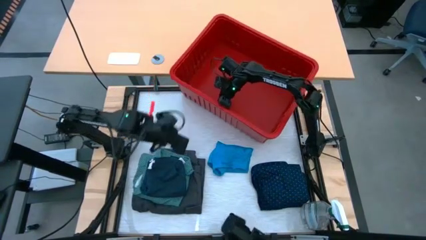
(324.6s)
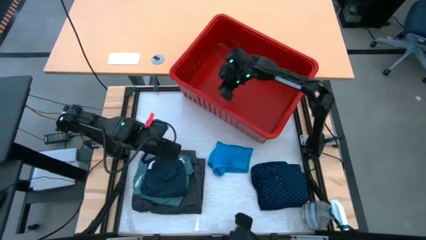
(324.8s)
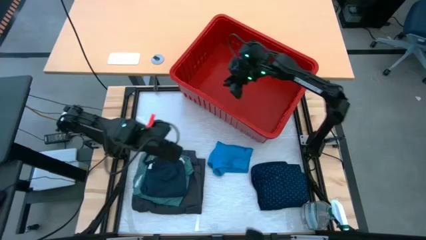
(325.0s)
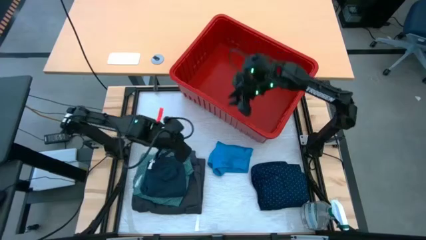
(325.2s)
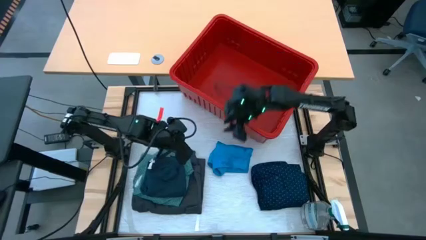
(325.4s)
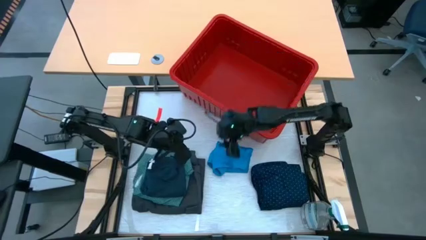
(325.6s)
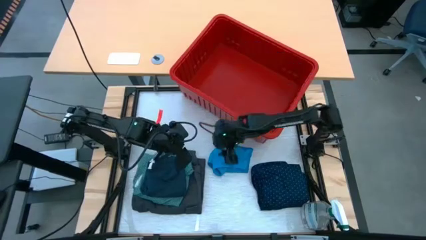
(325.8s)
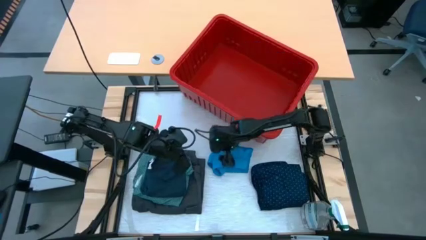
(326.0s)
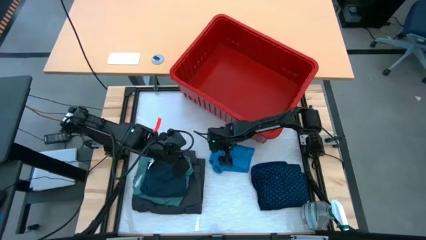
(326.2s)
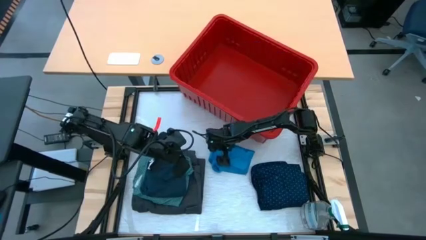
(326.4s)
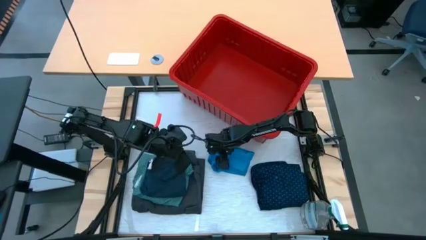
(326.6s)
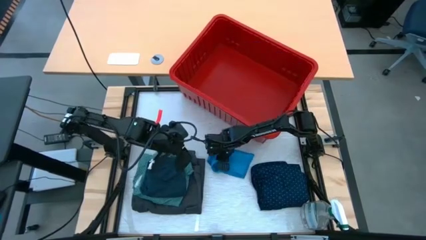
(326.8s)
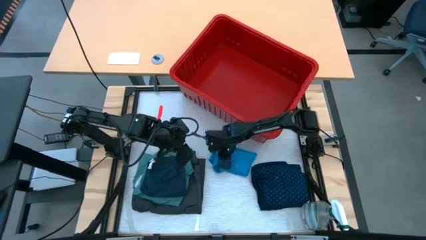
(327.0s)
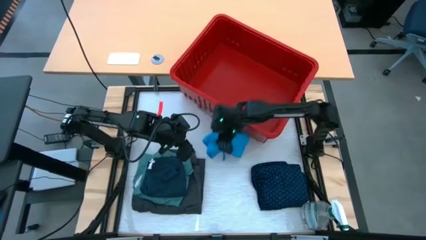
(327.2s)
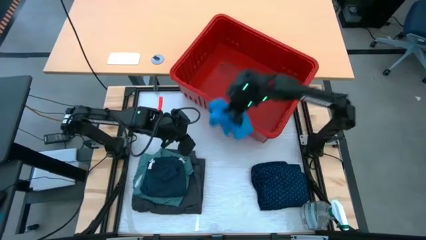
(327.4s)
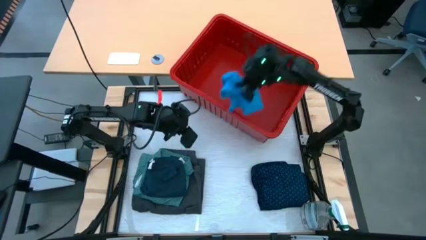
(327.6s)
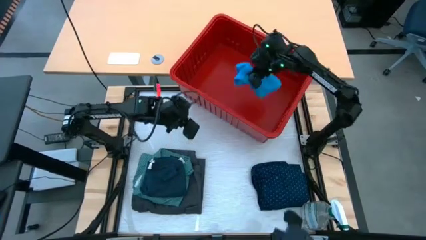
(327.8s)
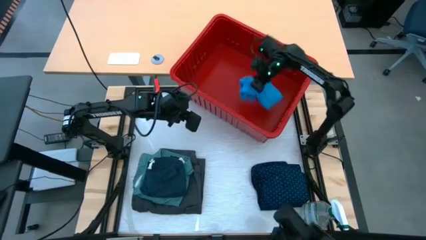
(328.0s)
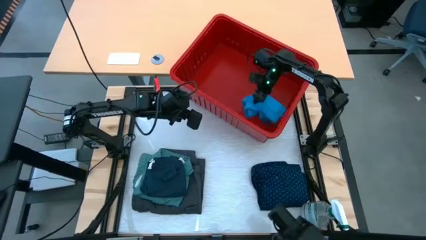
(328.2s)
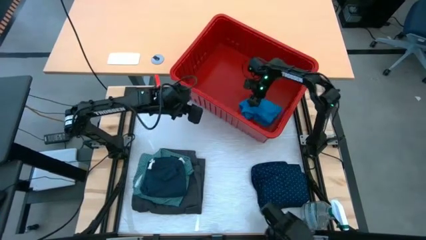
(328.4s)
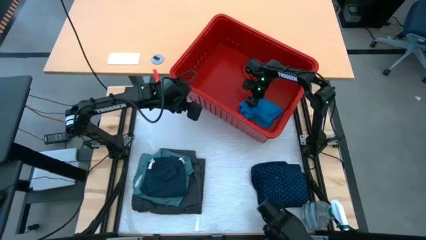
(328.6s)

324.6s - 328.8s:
Task: Fold laundry
Put the light blue shorts into the red bin

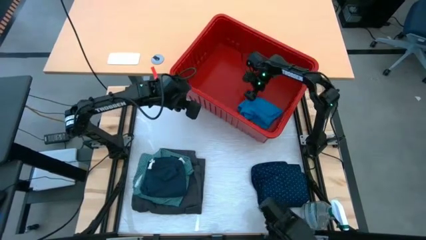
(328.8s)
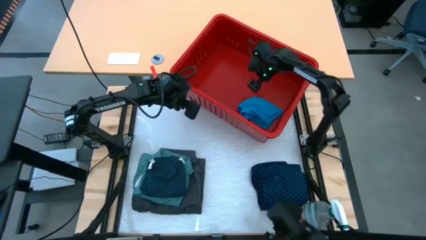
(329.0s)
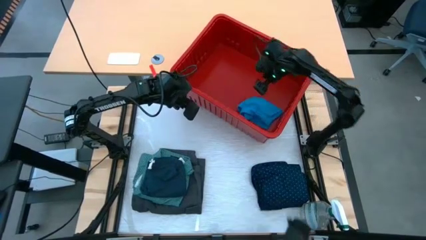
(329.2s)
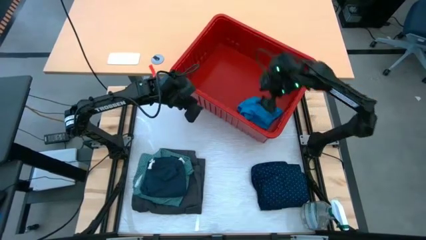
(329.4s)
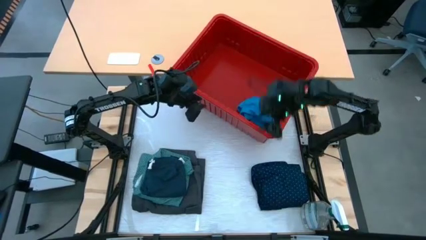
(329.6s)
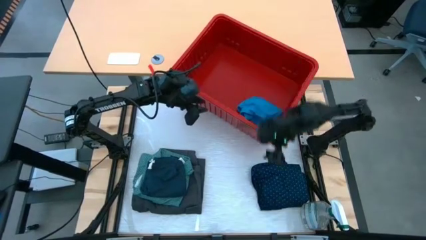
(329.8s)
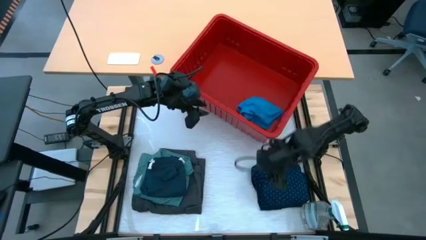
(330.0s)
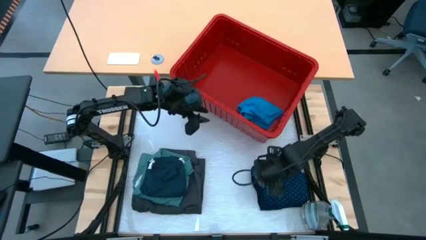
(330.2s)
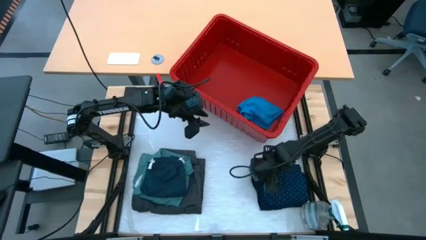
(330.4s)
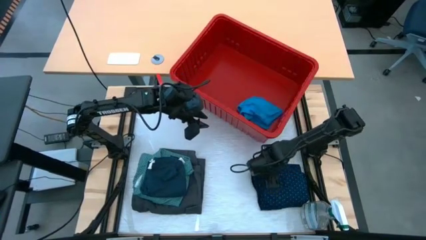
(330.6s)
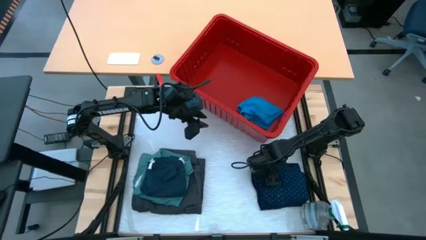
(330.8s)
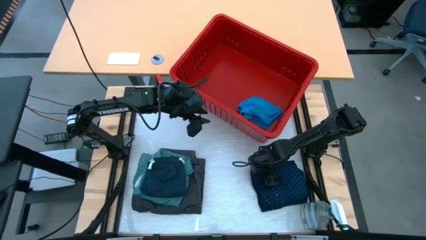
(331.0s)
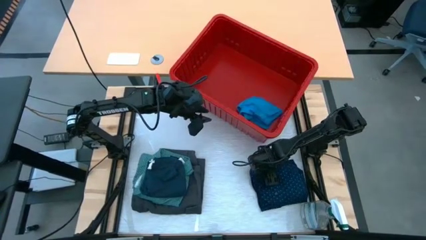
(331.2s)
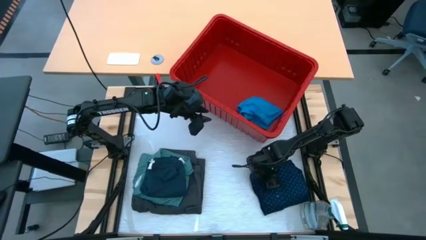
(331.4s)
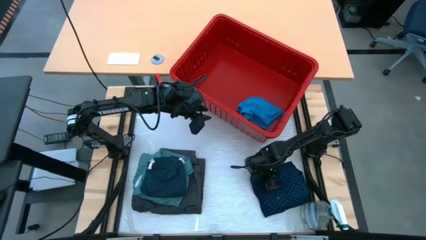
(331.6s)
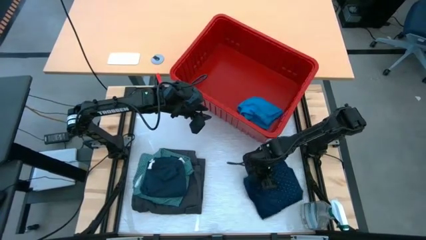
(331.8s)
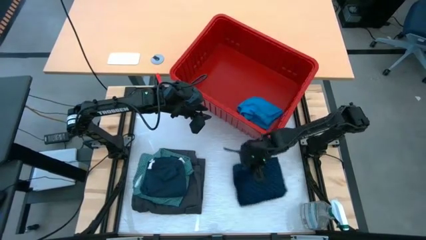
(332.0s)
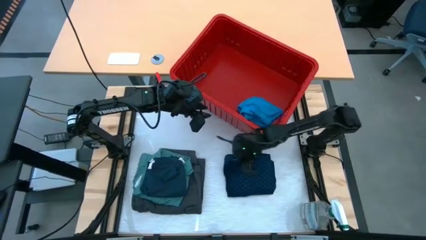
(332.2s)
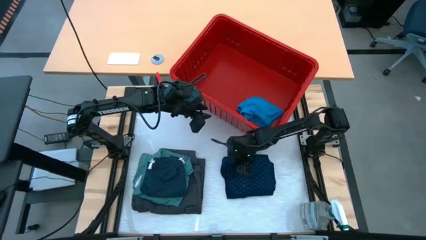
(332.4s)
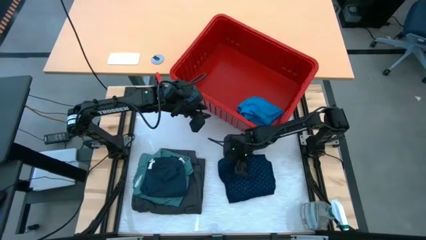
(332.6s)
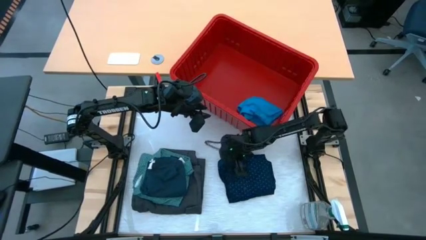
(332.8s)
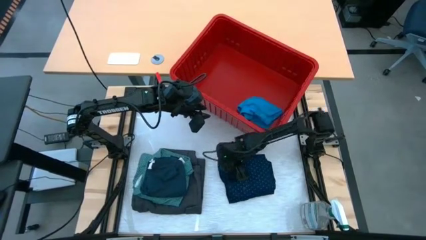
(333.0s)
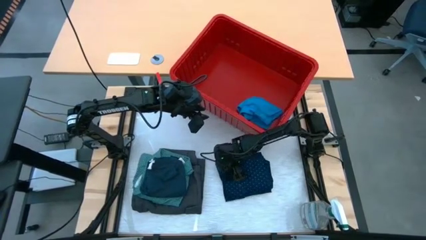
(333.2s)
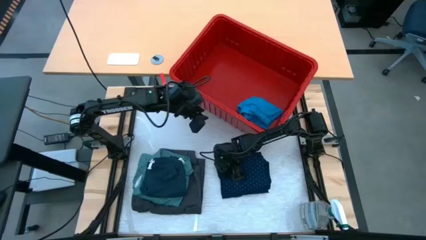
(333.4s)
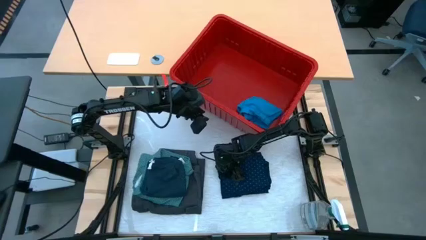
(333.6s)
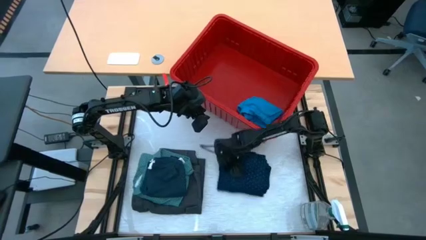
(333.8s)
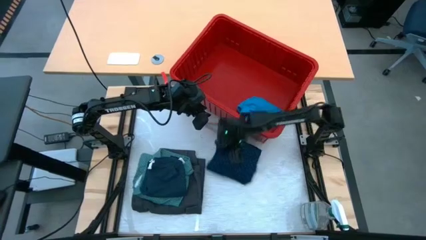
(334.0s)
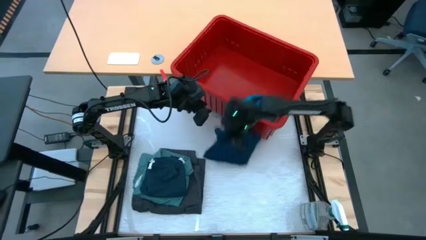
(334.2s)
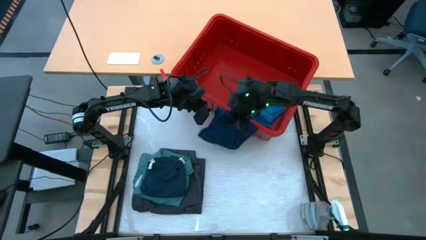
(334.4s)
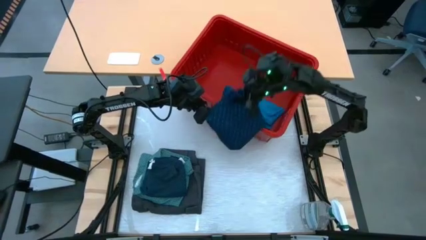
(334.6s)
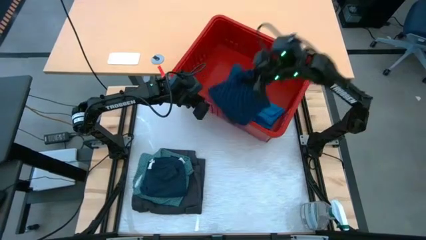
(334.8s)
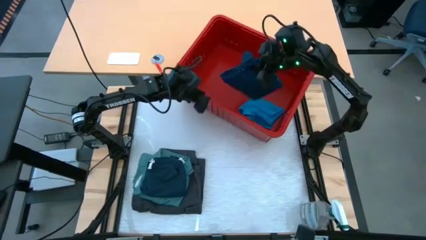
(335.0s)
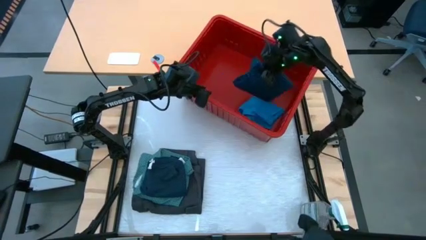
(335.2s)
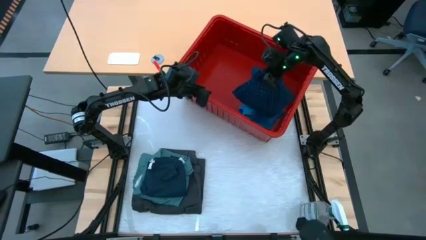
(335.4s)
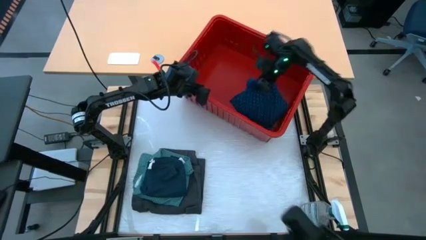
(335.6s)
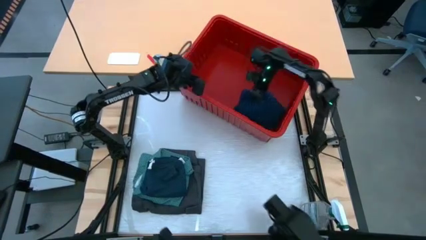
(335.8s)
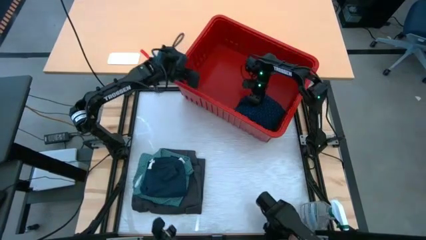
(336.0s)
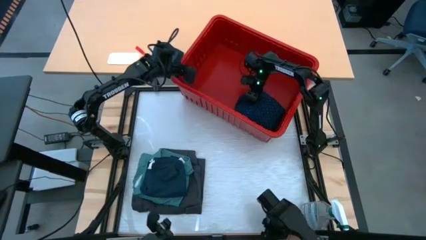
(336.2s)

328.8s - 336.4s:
Stack the dark blue polo on top of the light blue shorts

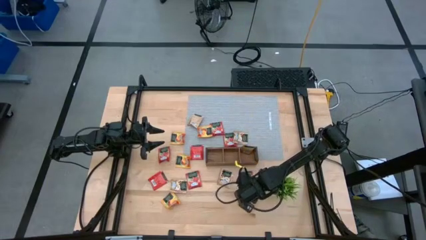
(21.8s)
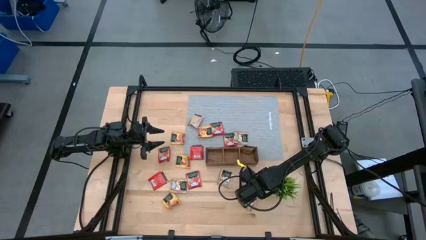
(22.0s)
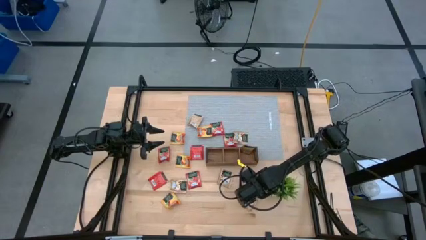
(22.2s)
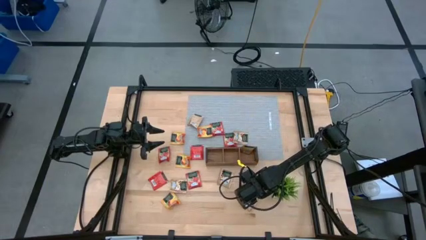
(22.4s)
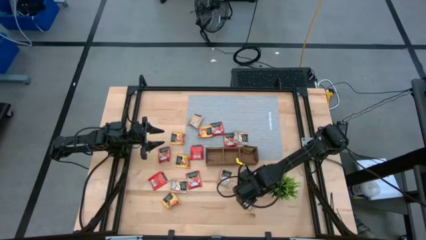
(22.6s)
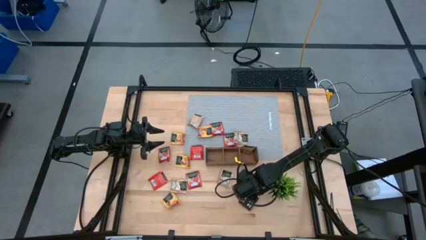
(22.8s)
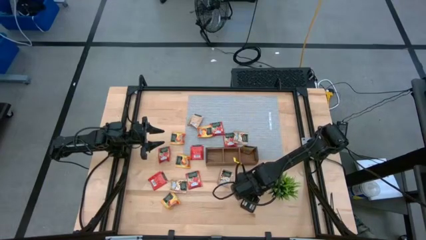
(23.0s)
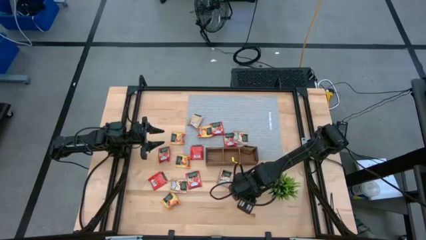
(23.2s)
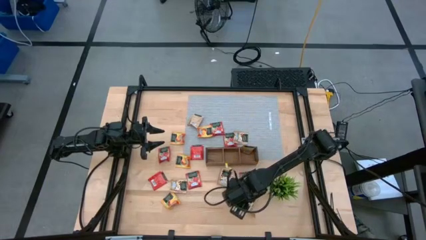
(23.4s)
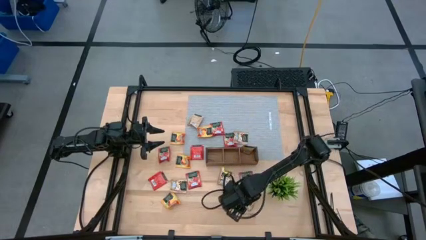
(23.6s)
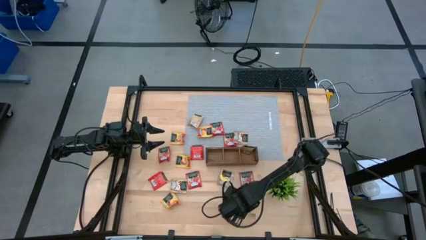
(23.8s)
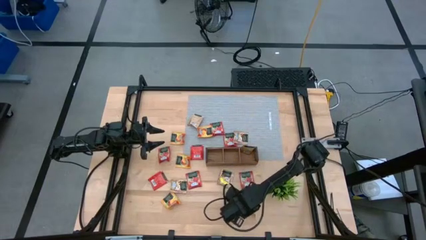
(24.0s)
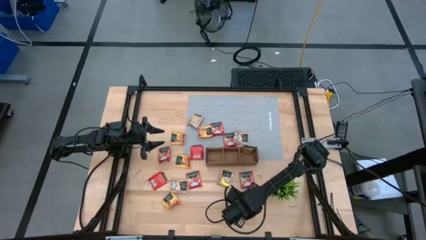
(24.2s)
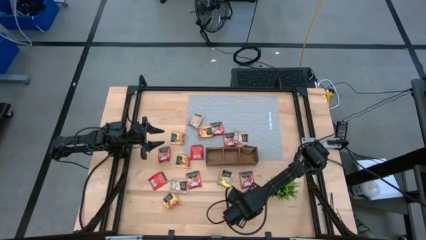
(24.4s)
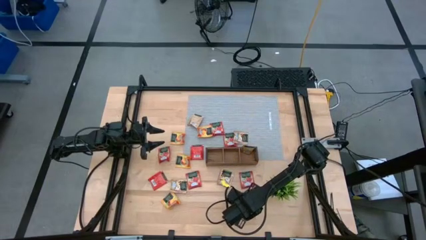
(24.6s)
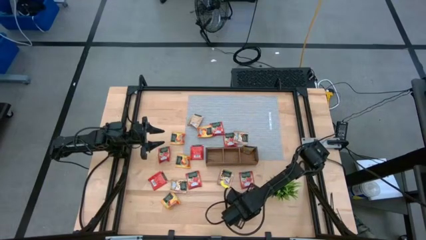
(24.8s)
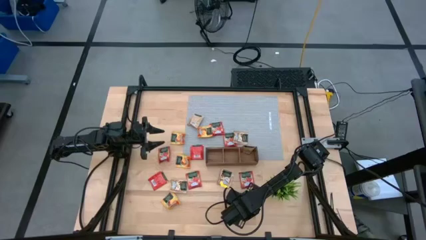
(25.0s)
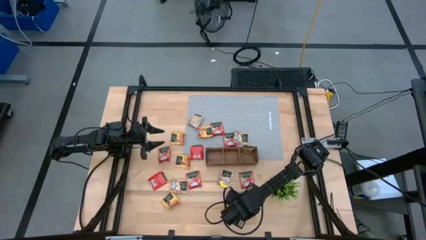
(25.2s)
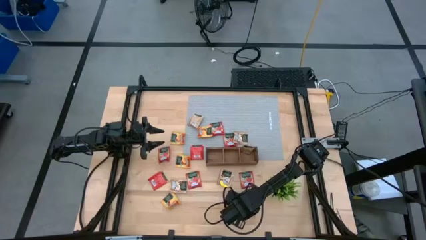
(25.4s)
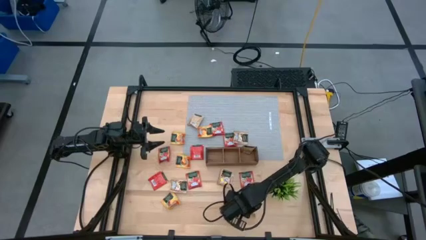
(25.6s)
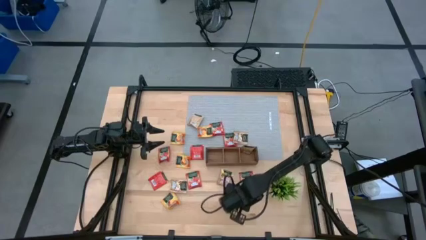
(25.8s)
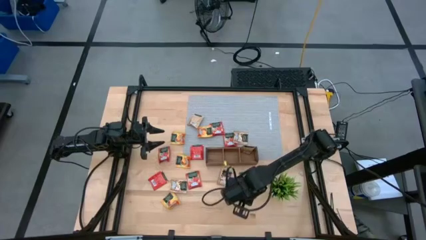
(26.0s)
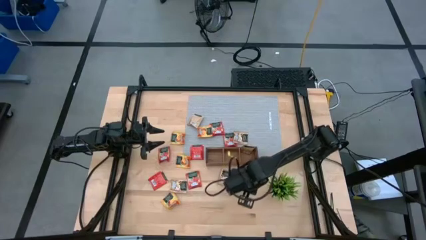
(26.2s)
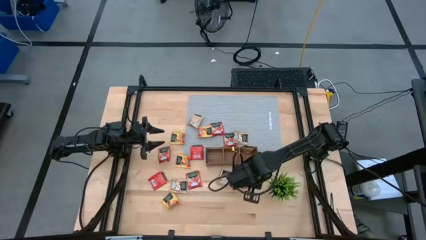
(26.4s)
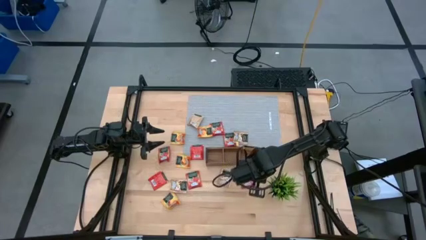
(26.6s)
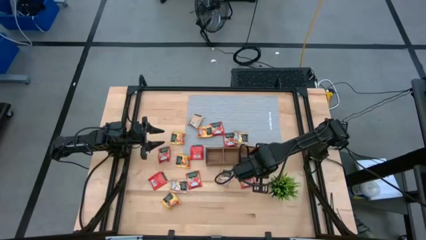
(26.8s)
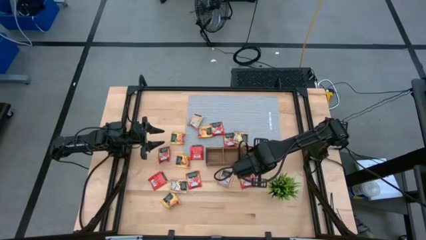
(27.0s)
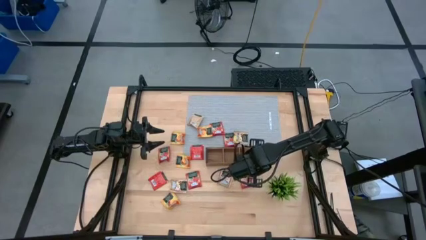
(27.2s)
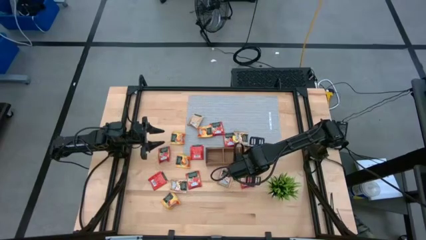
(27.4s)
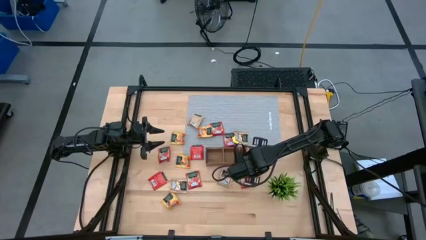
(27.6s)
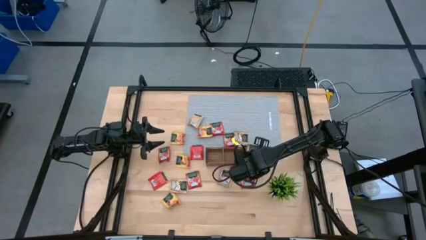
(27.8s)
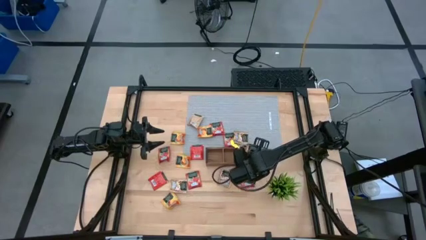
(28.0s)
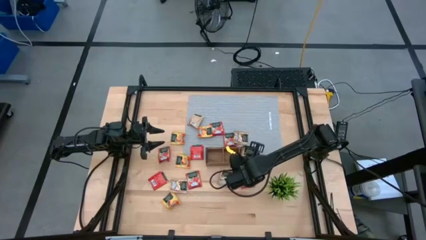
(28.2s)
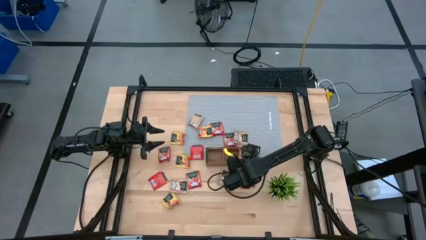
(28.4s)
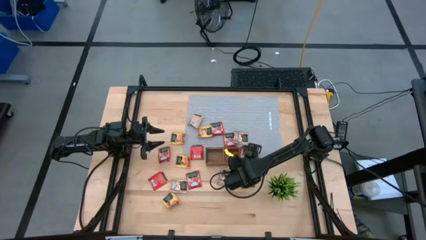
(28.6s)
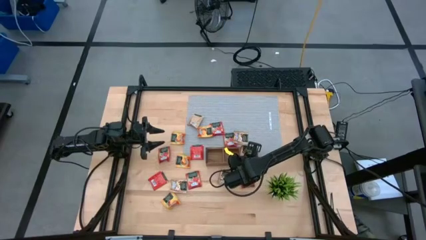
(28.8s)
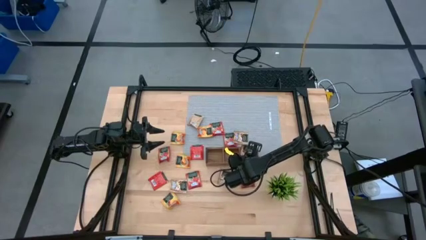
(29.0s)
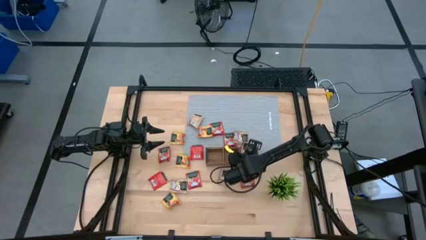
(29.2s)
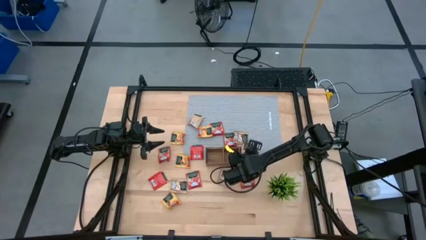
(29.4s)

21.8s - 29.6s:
Task: Pick & Place Tea
Put the brown tea bag into the right section of the wooden organizer
